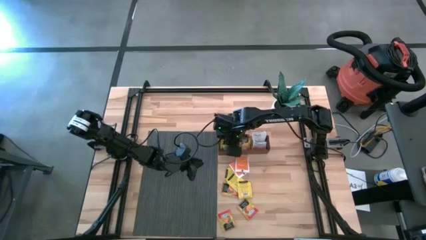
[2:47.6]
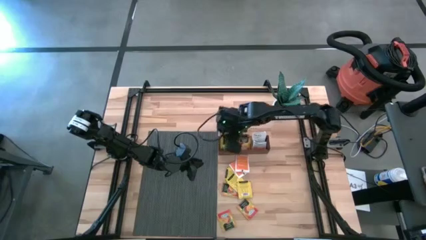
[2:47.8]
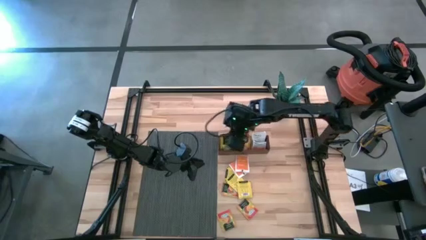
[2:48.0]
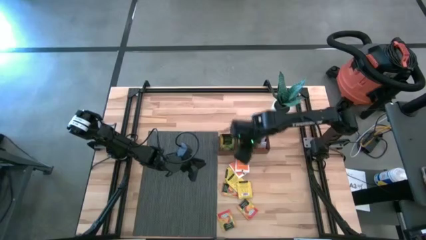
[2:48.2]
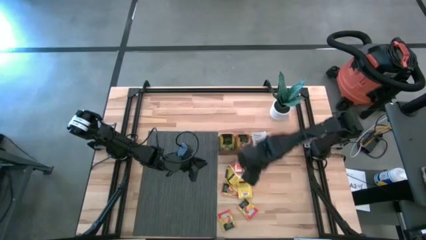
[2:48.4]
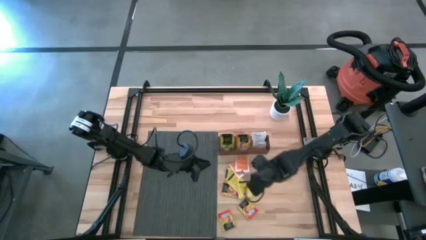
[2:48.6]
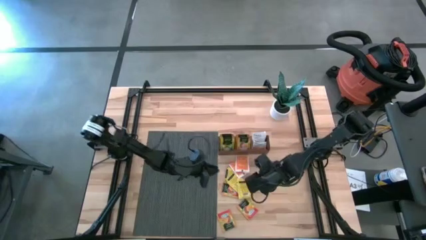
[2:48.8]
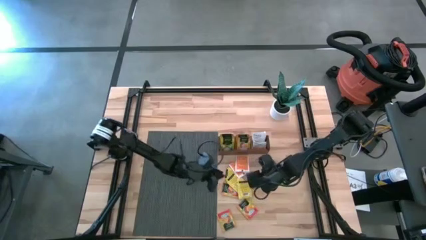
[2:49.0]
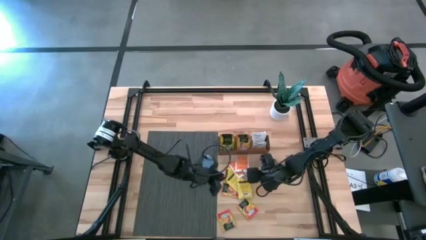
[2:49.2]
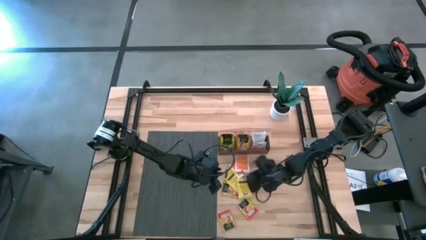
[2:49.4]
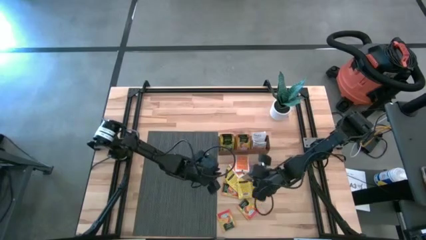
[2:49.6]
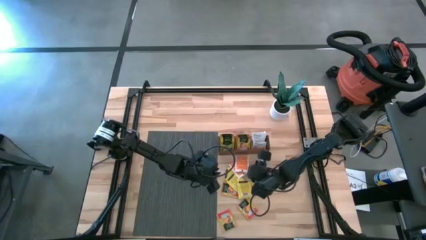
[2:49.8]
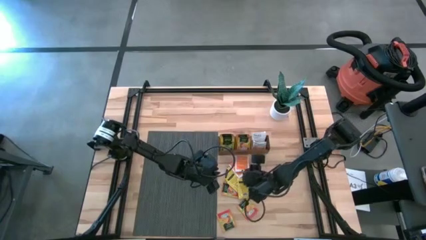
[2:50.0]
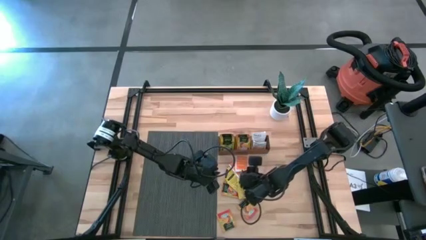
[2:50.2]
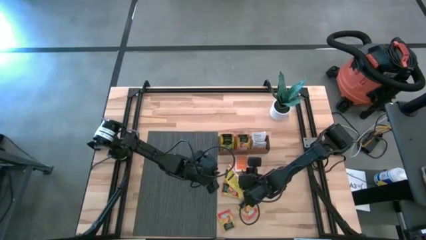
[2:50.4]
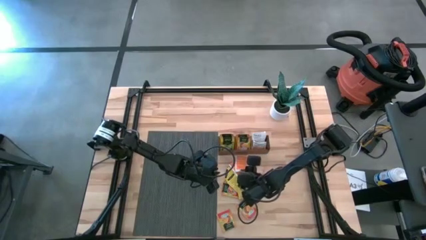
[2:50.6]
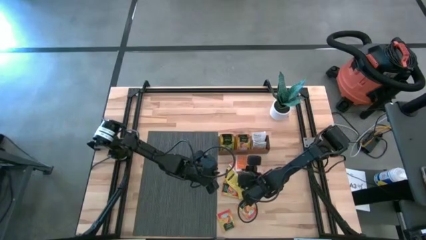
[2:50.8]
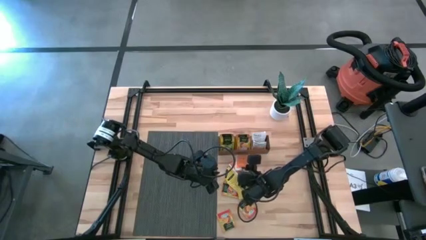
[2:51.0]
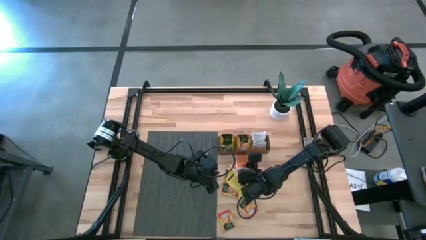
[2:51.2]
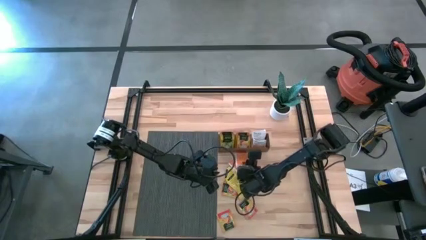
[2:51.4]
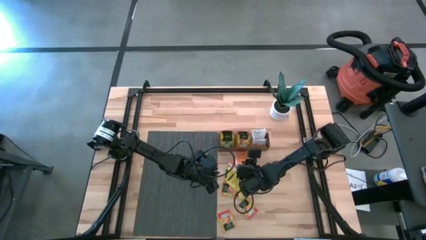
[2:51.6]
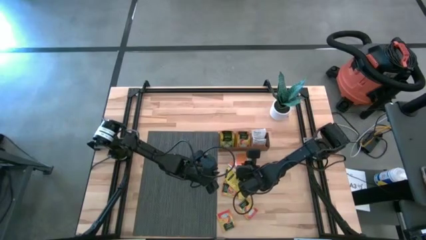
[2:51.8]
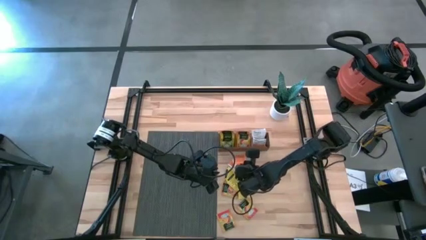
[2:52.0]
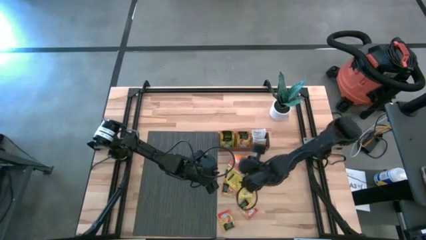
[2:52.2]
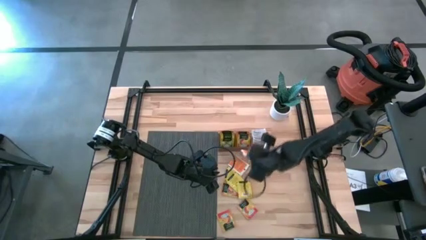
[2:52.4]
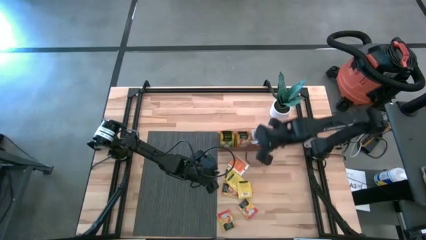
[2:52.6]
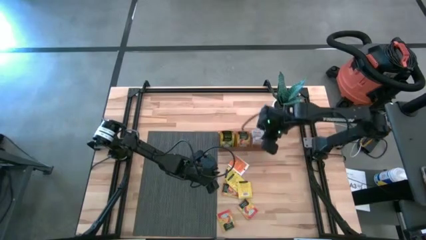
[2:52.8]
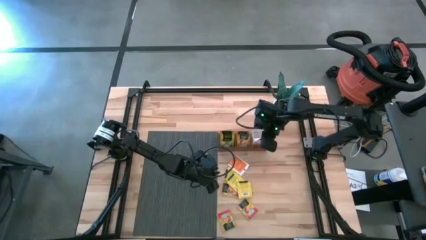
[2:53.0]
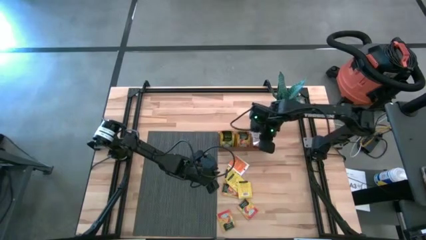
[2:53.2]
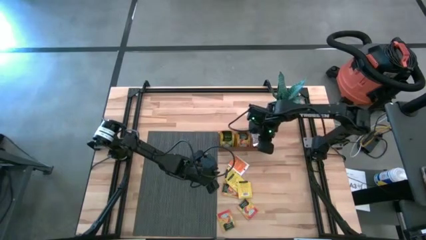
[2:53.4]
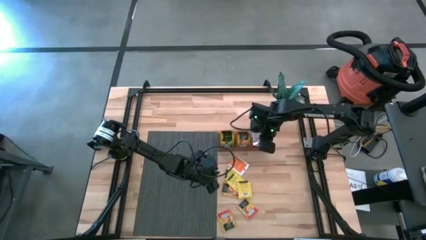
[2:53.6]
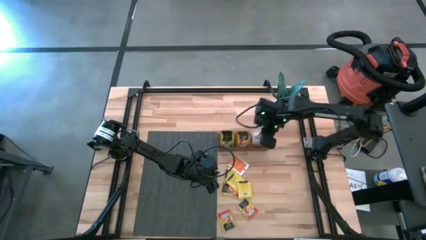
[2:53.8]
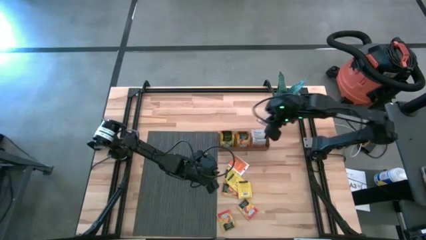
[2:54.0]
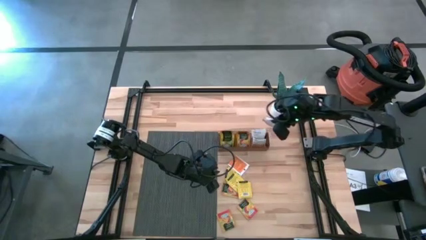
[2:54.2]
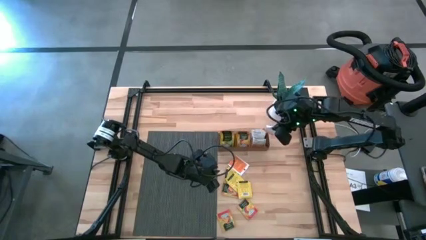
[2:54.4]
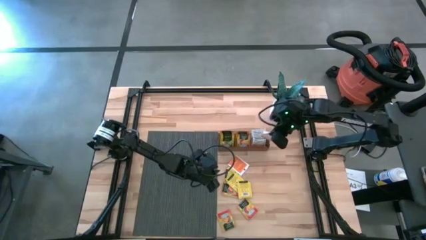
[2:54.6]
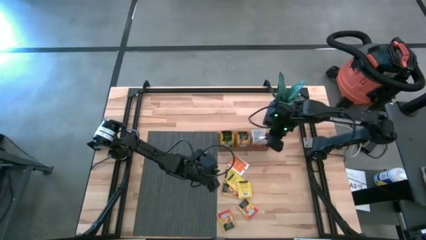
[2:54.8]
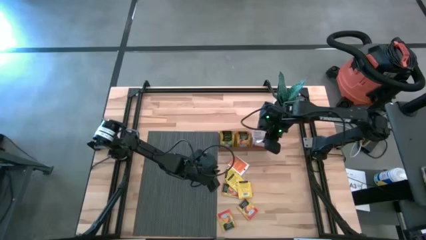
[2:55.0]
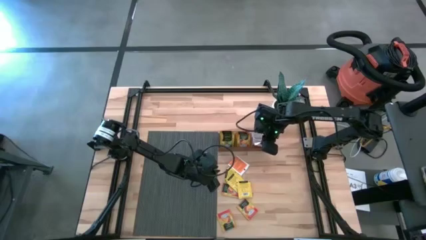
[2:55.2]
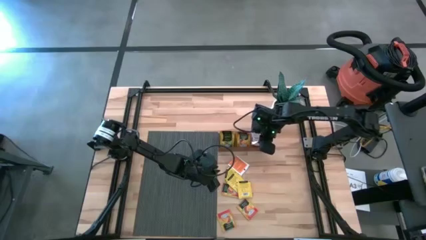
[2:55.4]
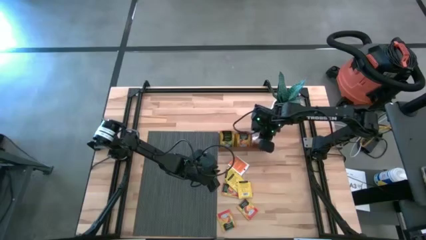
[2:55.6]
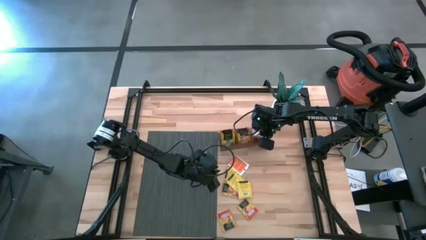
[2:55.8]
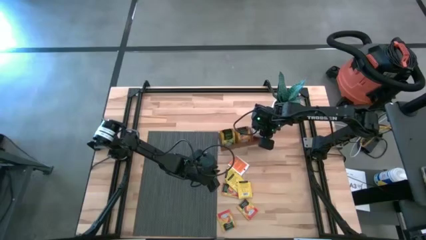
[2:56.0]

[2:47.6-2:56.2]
Task: Pick & Place Tea
Put the white tea bag into the right section of the wooden organizer

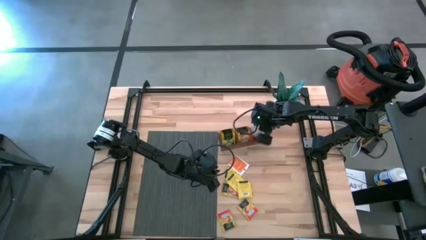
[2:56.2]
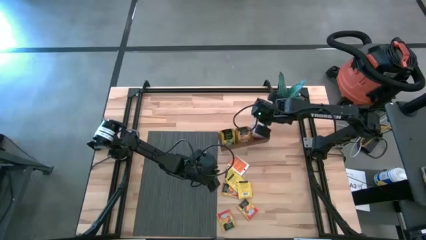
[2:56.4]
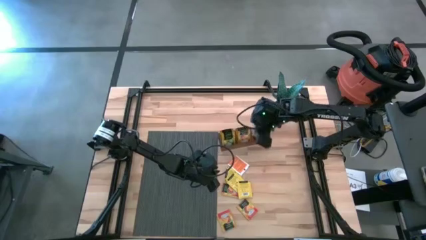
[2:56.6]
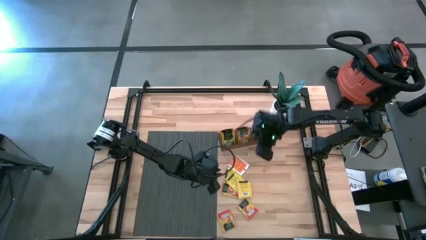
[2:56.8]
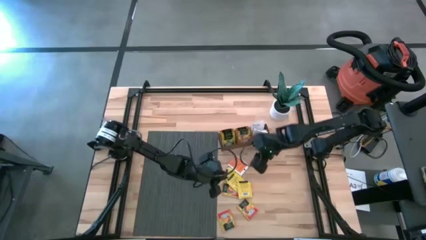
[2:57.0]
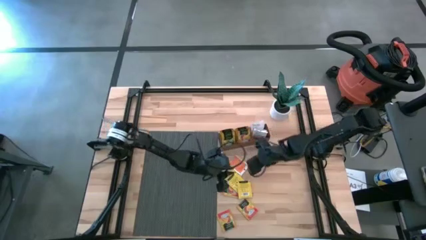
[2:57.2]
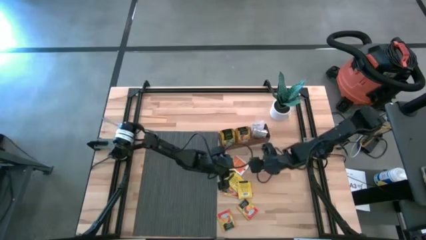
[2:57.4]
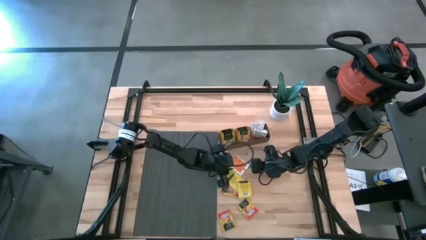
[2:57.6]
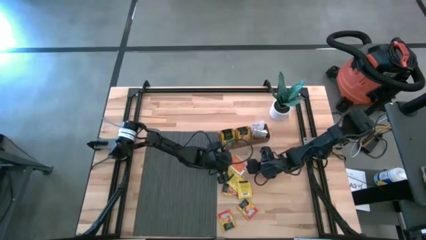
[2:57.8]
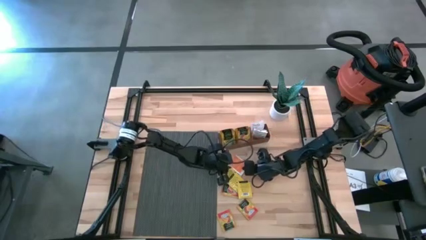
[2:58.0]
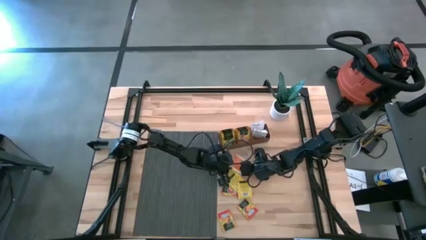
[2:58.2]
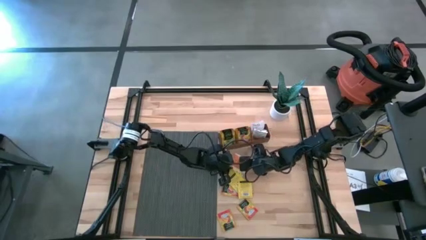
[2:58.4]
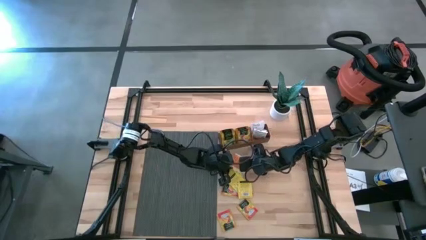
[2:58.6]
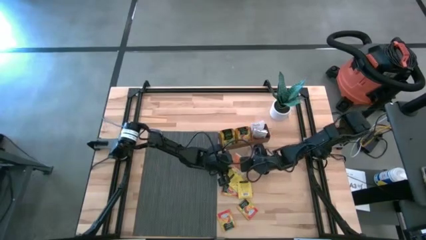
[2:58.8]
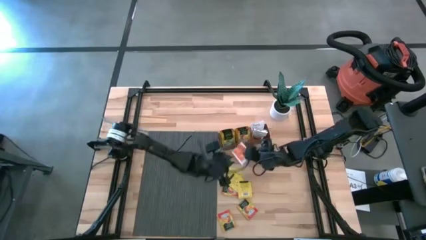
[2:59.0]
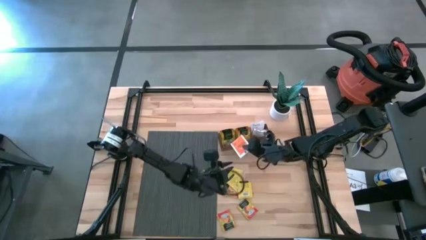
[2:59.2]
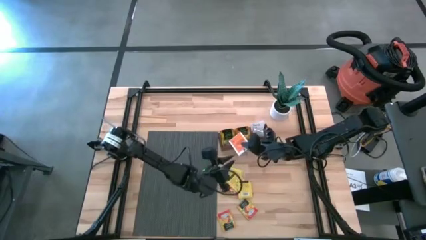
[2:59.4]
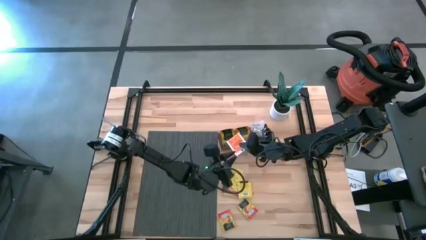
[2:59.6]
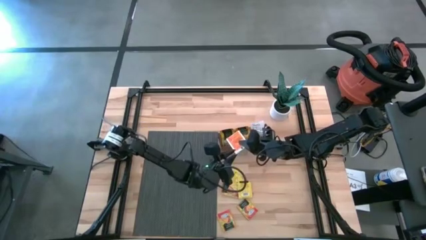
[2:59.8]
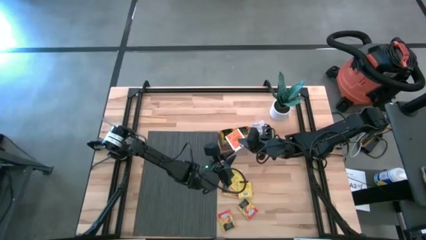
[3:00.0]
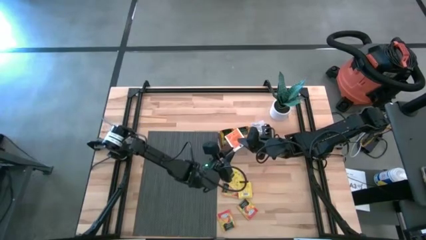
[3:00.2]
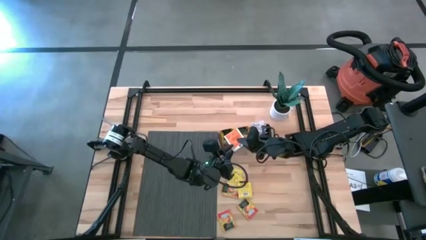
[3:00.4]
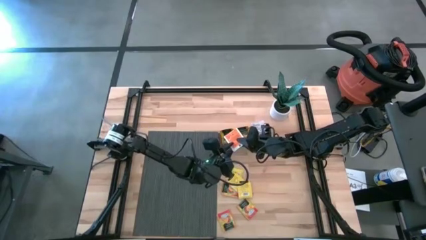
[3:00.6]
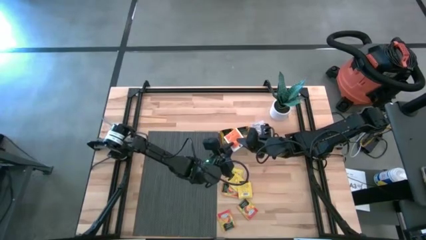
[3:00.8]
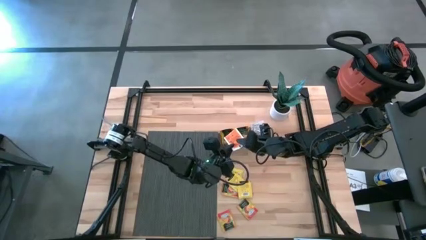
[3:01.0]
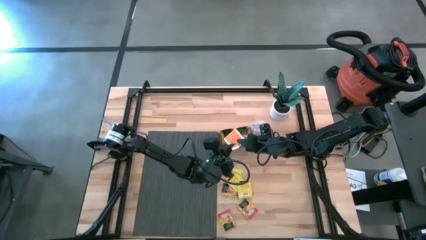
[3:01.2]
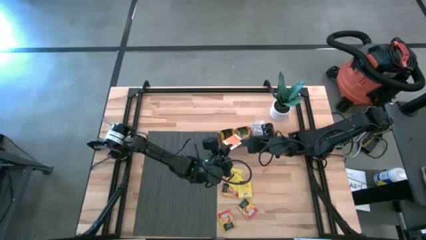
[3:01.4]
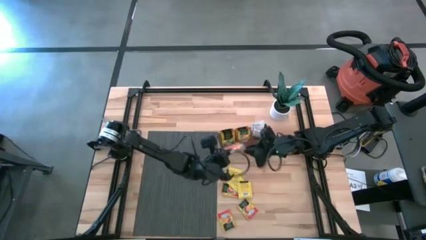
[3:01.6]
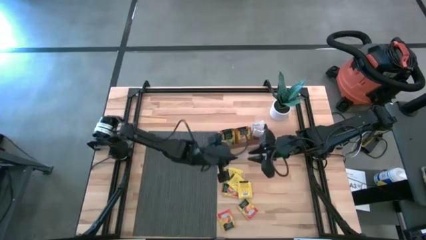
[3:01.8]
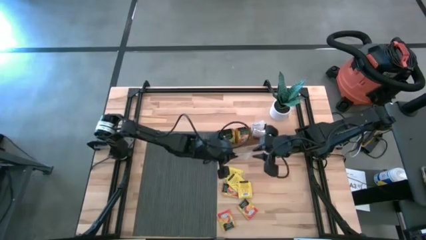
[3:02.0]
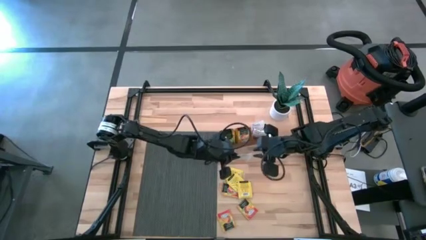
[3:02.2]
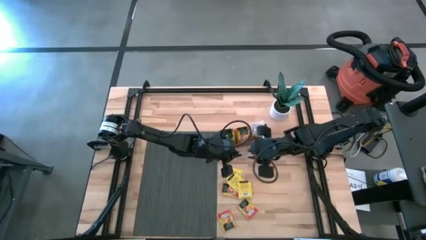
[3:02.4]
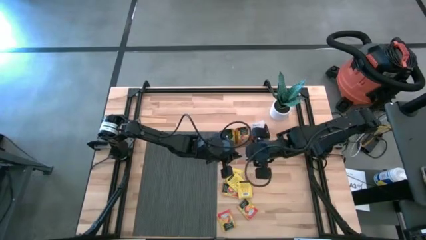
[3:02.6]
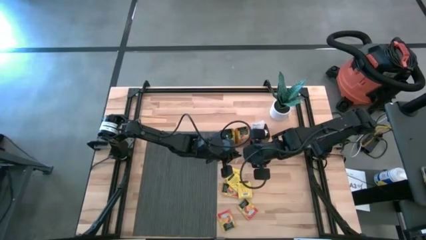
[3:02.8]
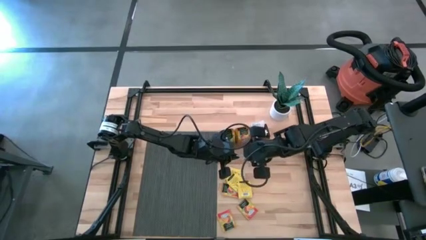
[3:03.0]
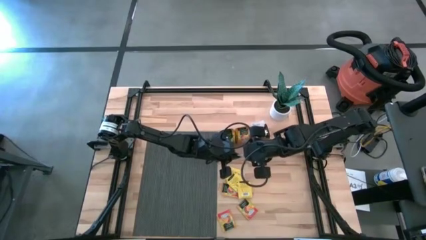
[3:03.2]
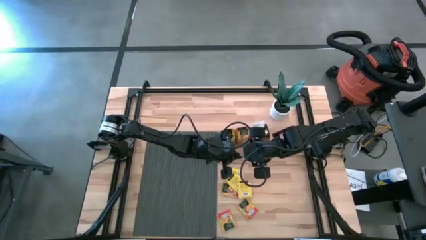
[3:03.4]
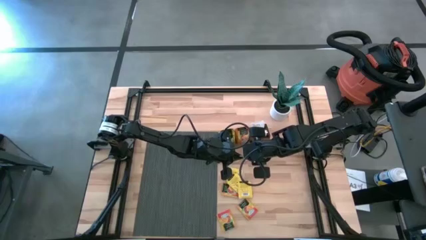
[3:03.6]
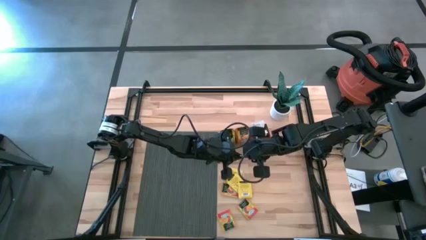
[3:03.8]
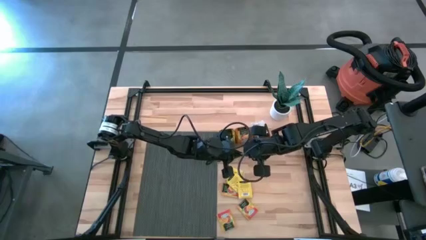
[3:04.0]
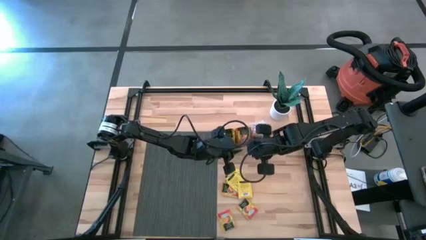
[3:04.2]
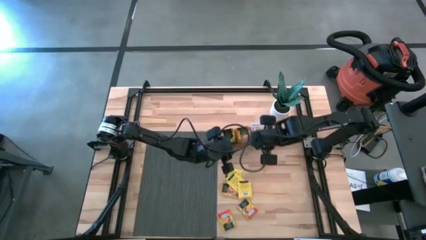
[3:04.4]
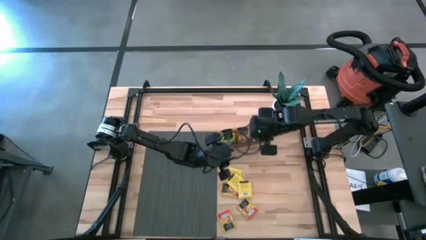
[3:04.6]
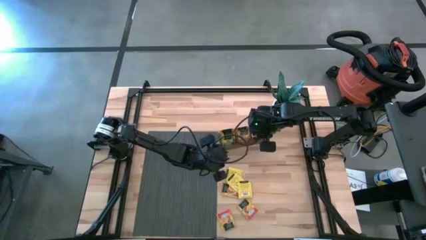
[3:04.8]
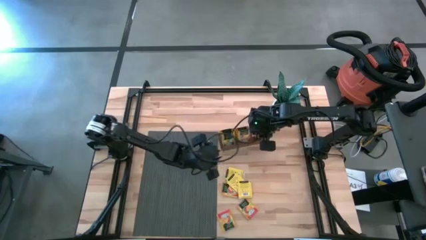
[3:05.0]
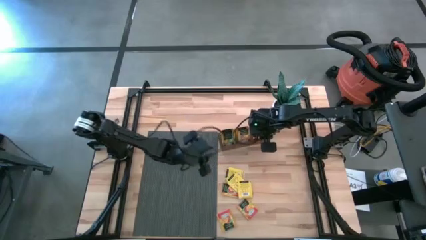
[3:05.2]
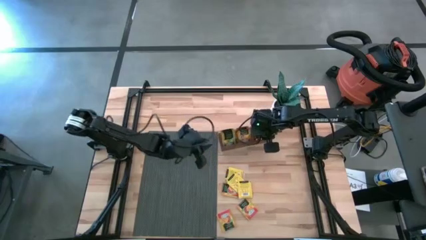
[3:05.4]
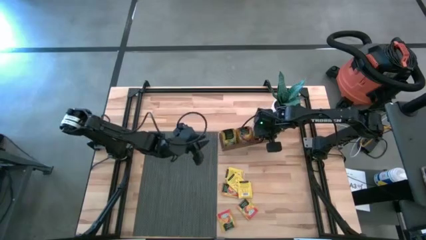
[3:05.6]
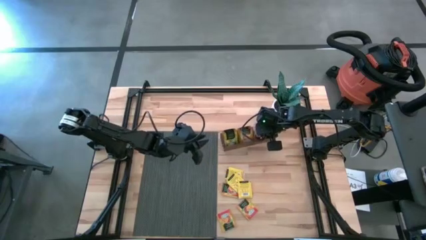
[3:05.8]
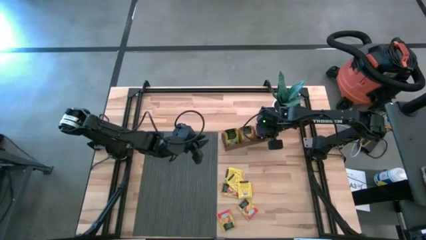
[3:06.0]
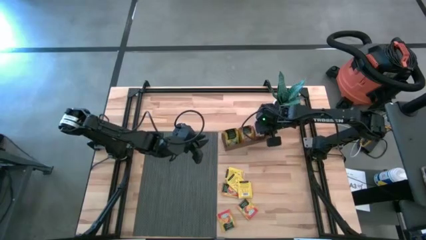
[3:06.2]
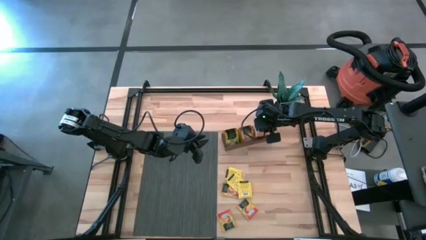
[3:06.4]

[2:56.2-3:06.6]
Put the white tea bag into the right section of the wooden organizer
